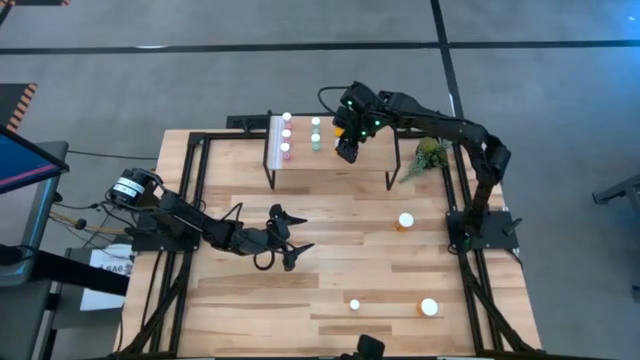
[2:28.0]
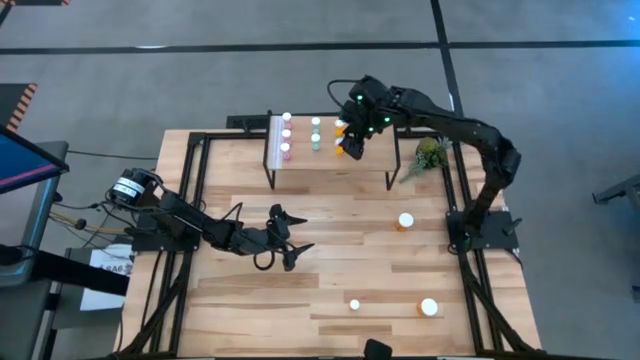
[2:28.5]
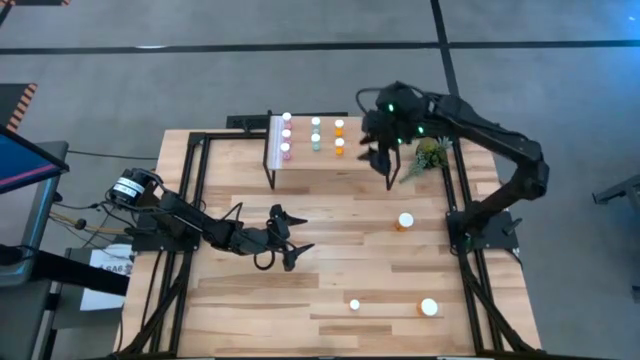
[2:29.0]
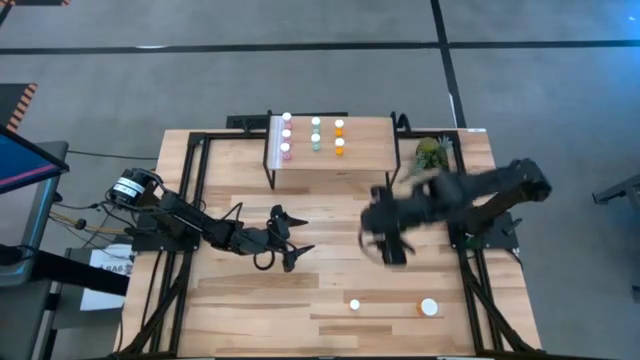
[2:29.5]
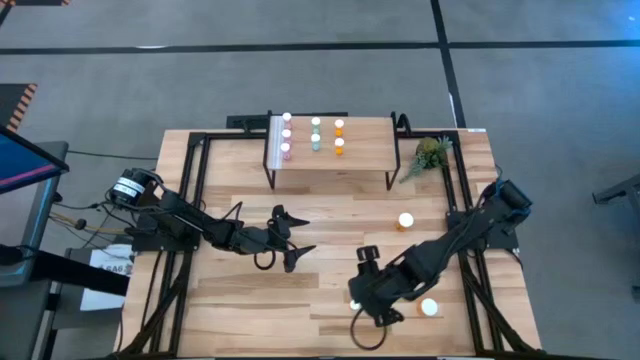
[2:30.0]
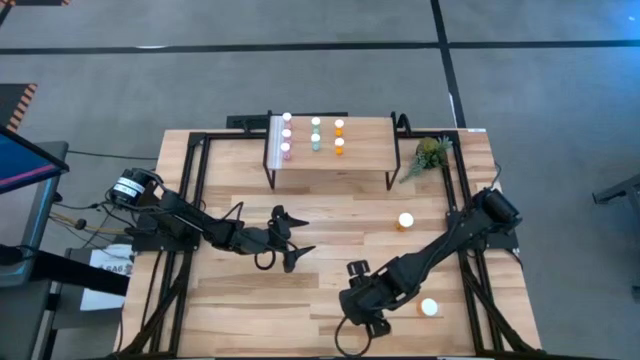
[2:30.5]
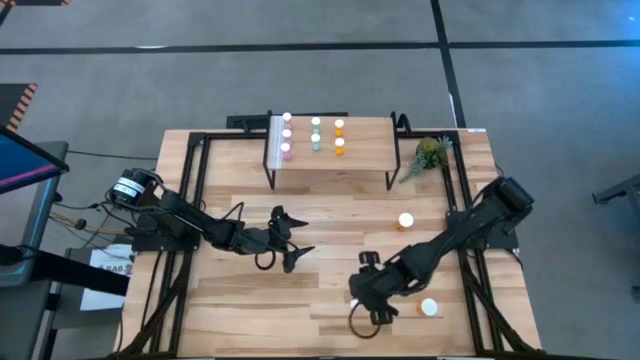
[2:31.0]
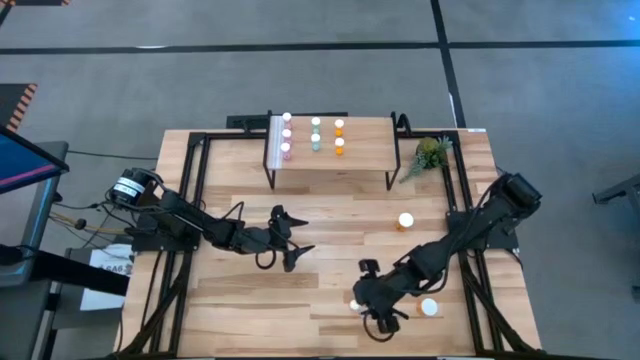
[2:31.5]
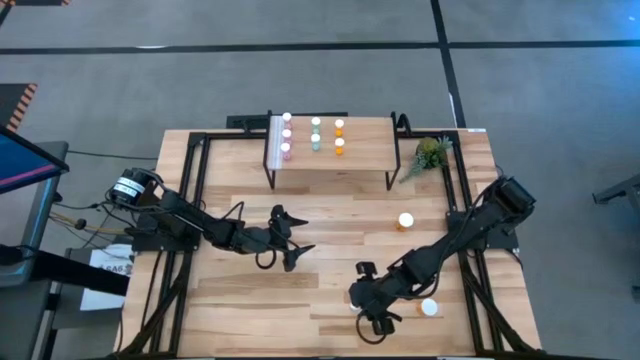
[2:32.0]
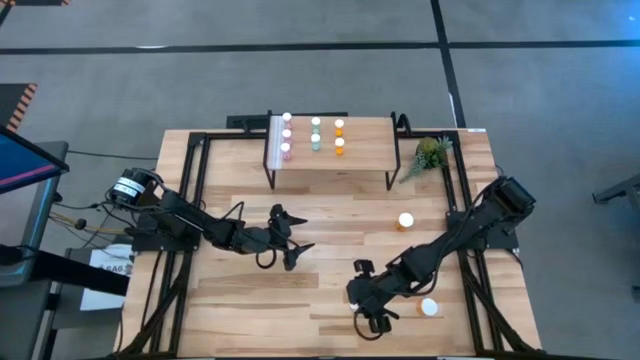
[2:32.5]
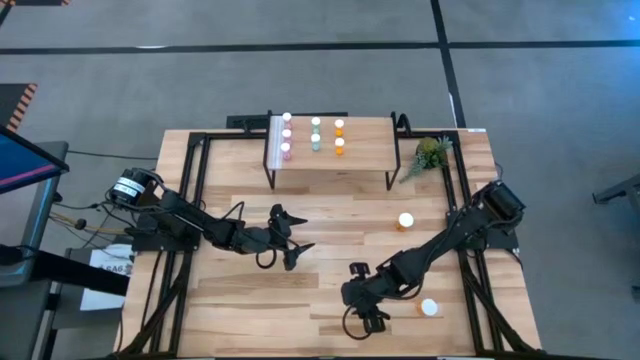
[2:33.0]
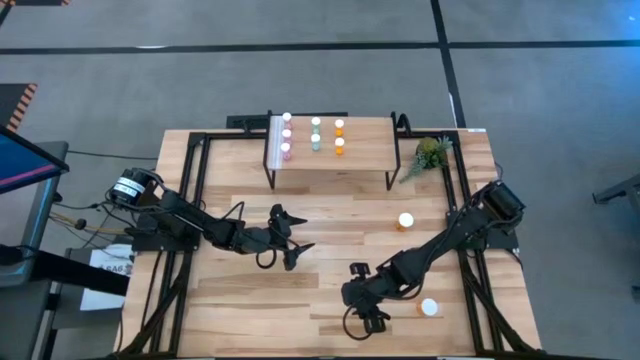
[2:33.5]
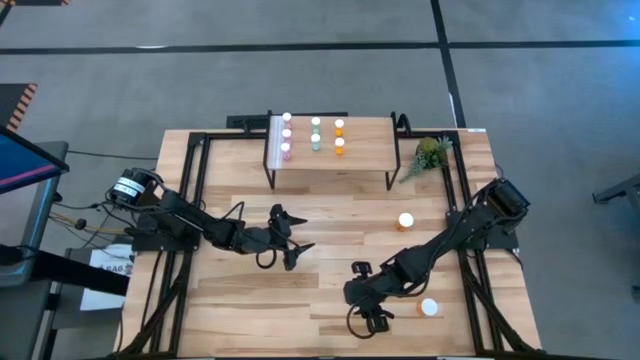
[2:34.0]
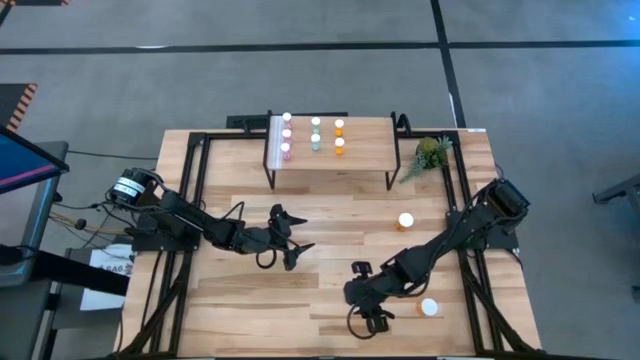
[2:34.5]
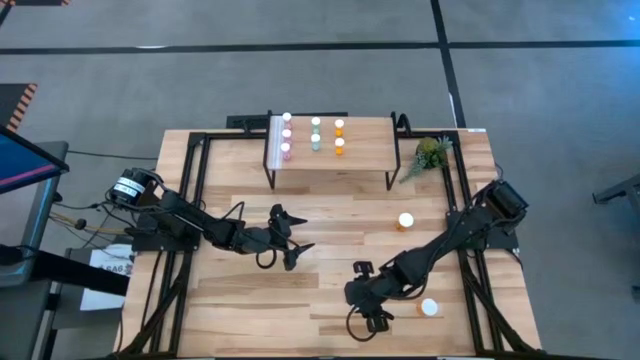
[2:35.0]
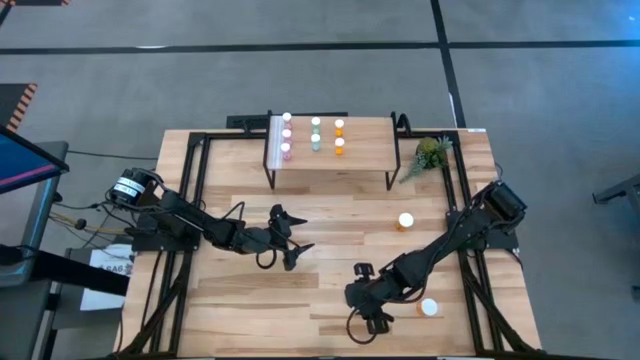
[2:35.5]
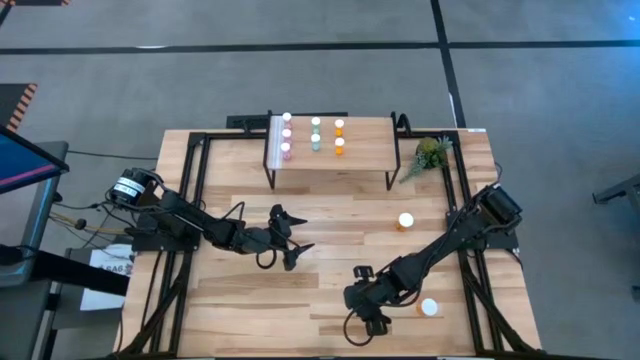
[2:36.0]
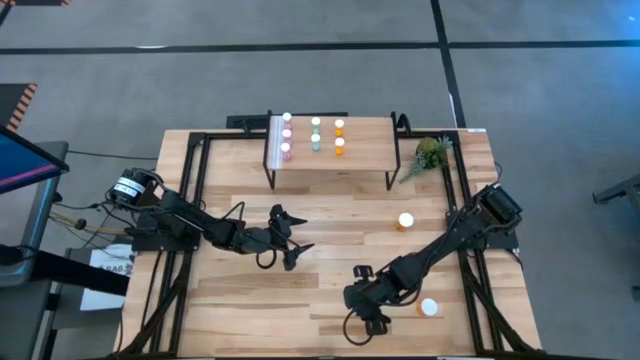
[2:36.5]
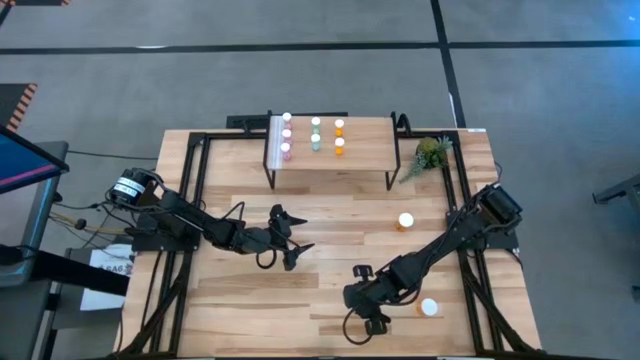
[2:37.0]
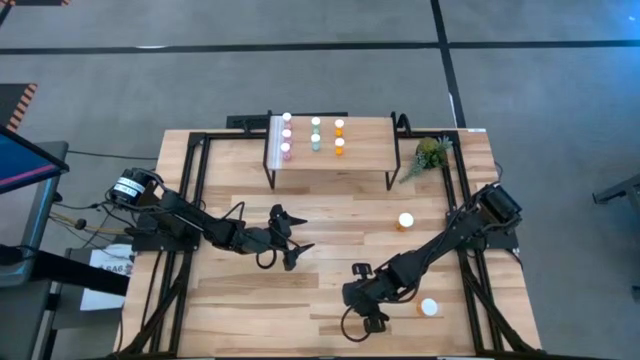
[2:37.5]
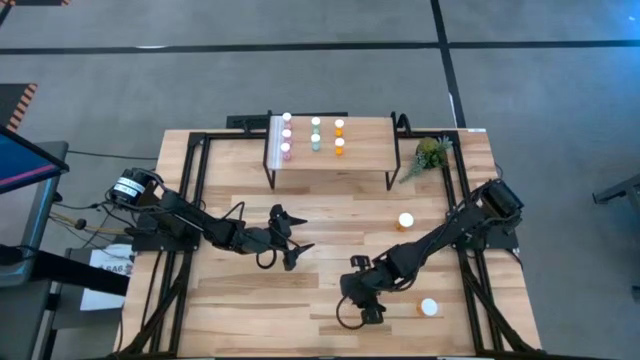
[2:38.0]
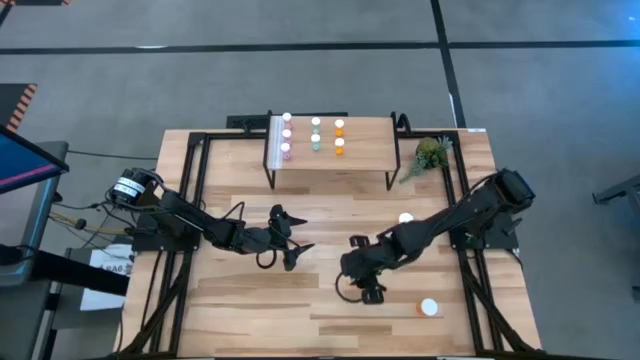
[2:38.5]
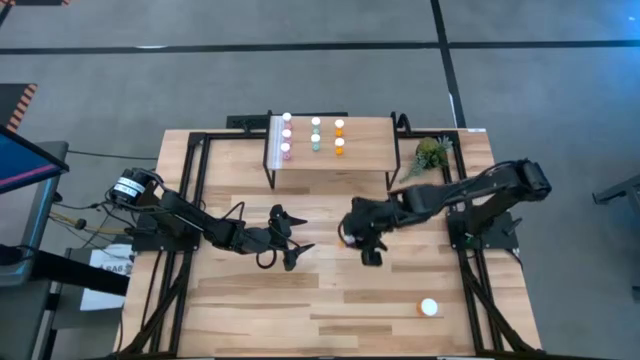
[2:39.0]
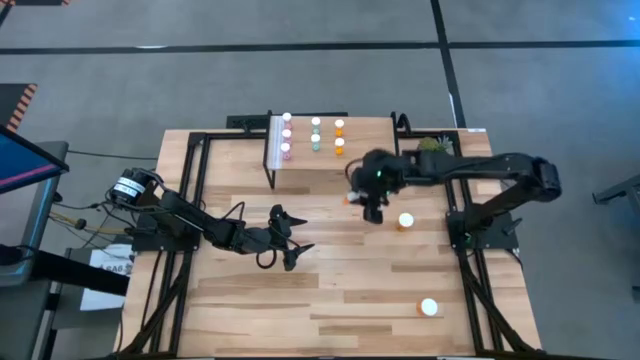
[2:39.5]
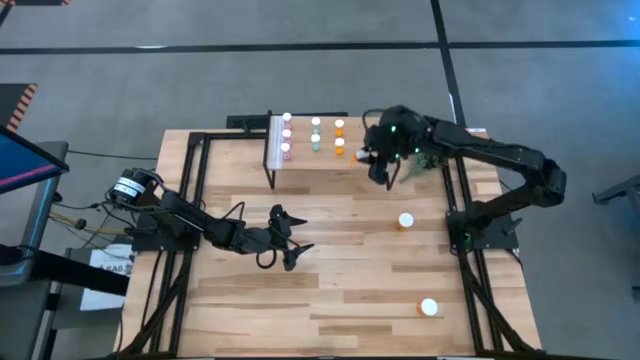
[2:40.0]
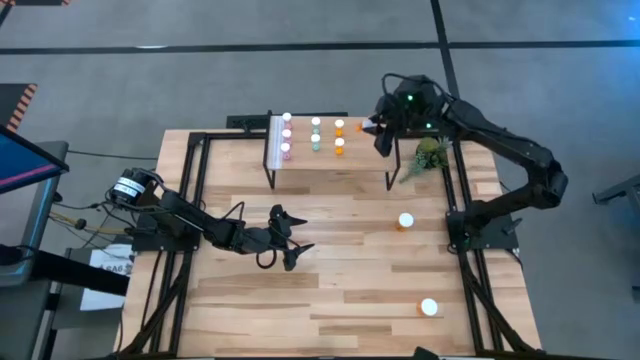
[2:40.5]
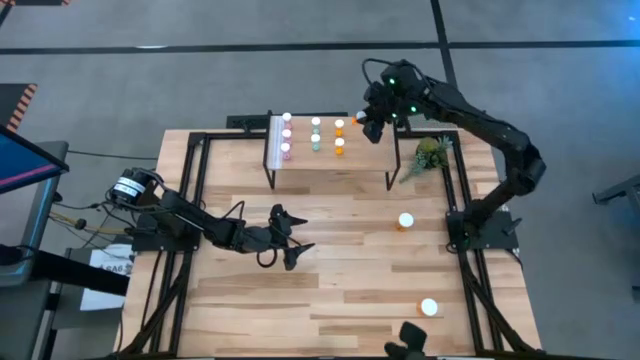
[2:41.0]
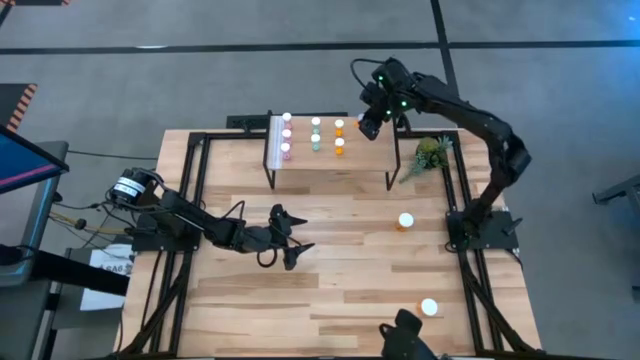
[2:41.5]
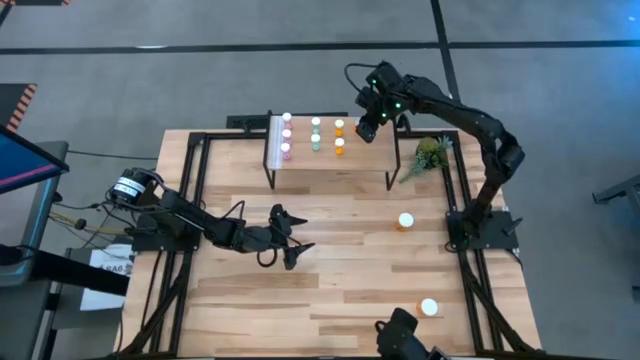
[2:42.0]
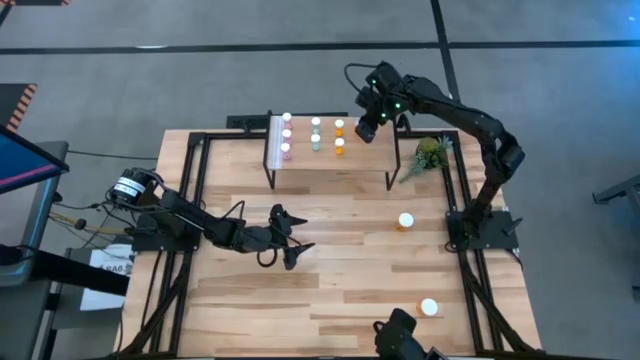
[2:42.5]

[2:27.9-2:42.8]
Task: Pick and place medicine bottles onto shelf by color
Put the small orange pill bottle on the shelf

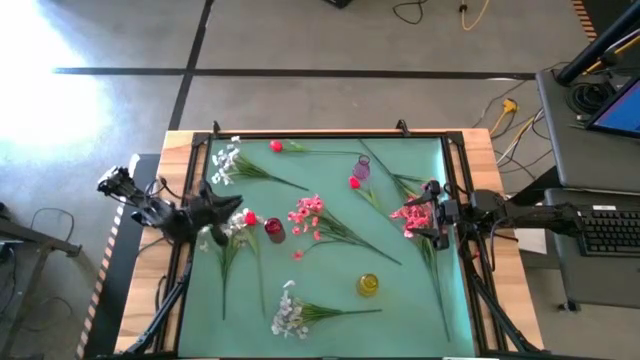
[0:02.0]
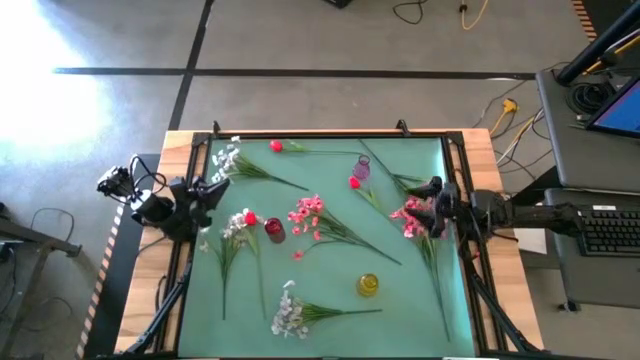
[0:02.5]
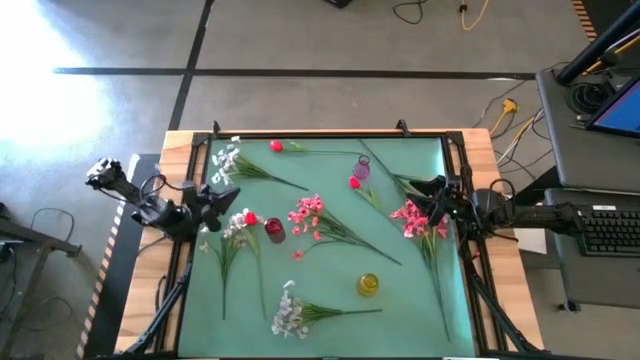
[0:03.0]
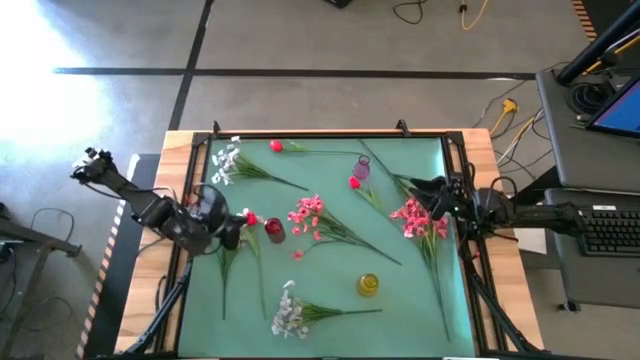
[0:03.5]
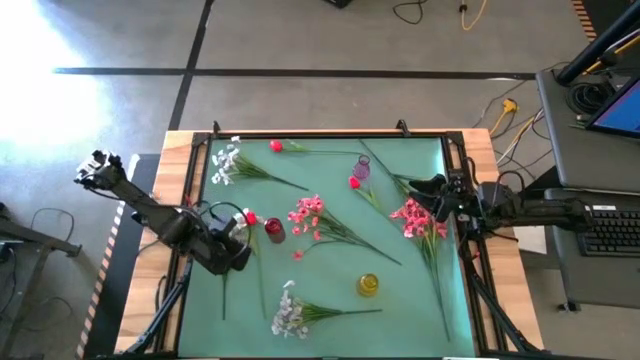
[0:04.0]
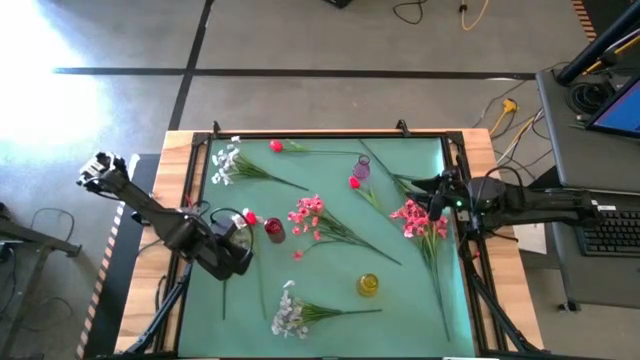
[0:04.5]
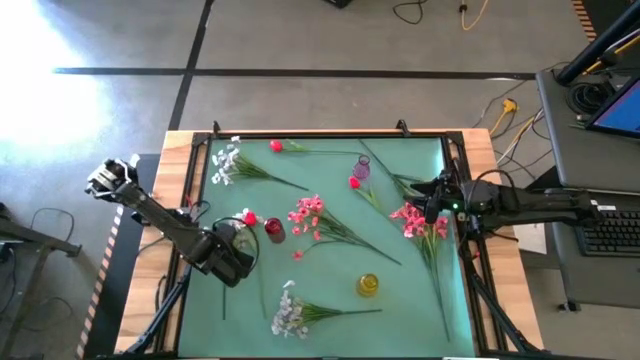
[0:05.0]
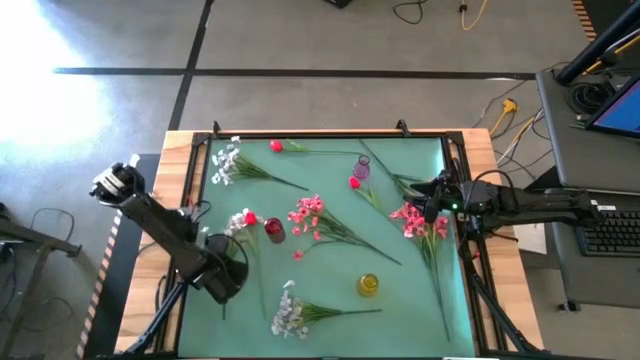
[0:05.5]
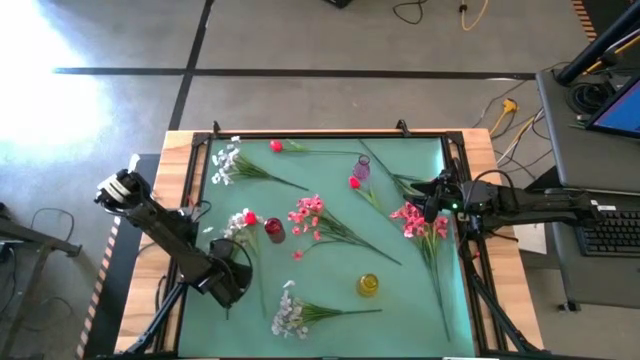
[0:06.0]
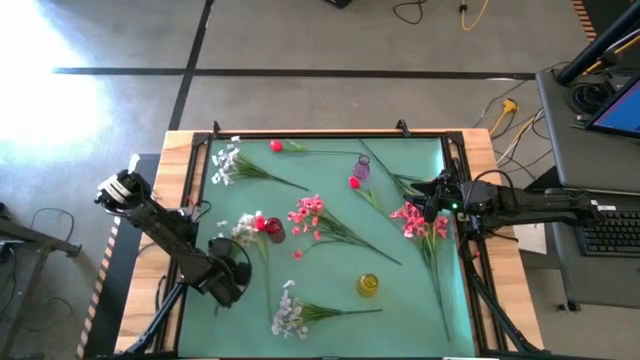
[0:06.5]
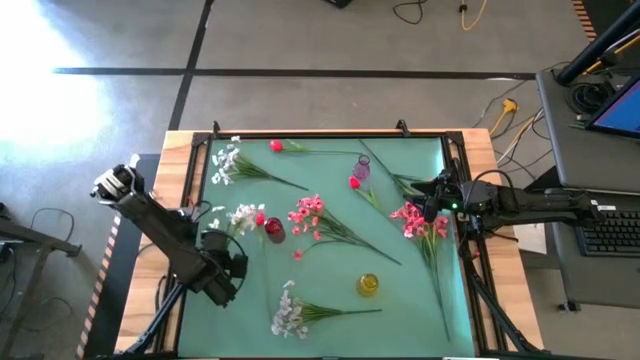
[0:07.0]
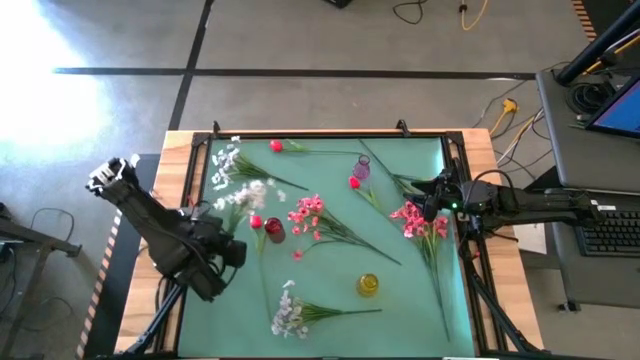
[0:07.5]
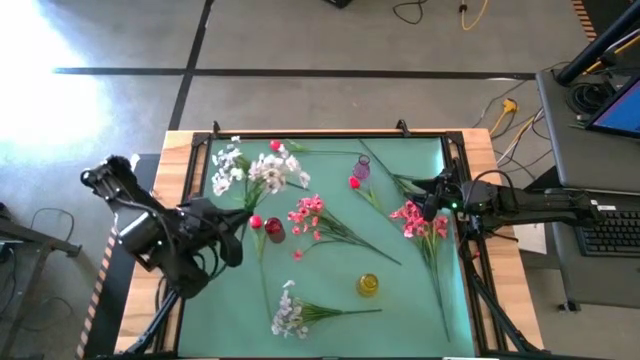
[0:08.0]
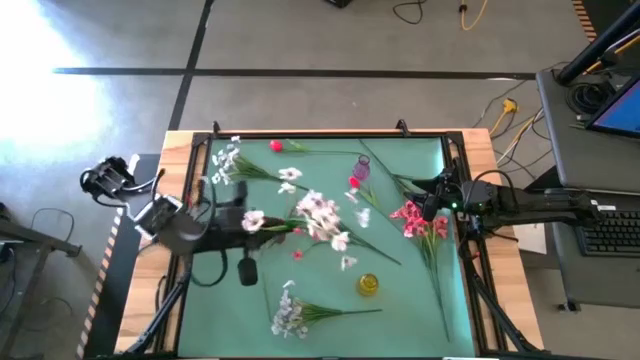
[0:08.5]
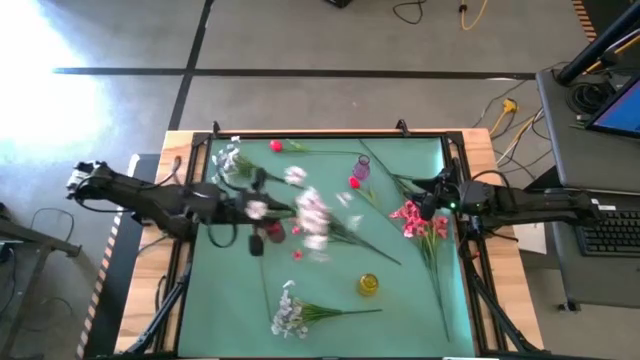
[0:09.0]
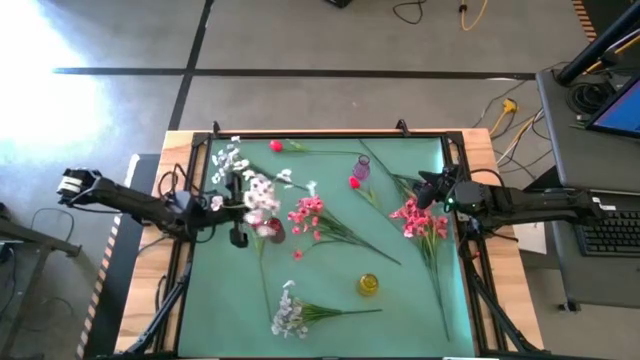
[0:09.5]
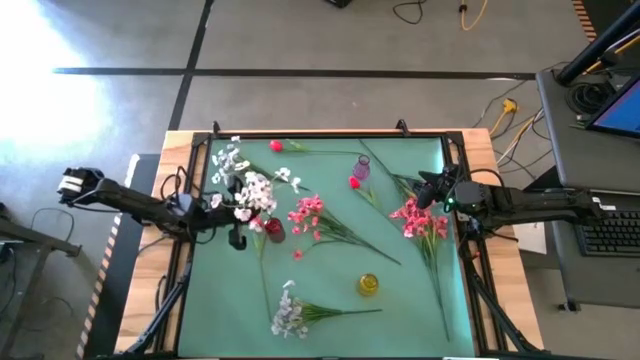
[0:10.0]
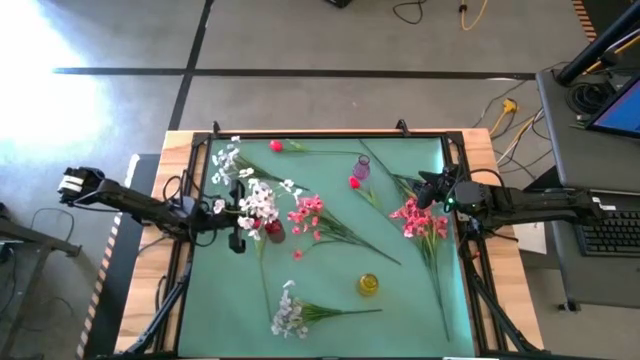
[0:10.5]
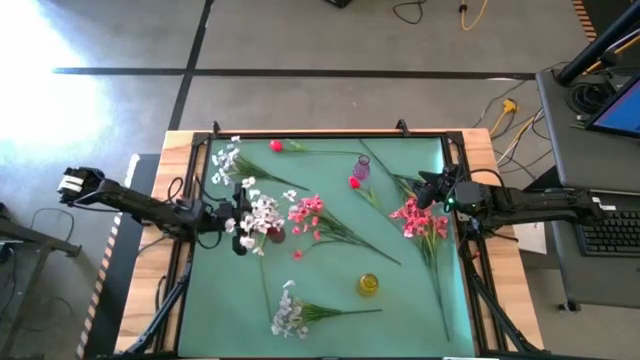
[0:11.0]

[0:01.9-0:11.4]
Task: Sort flowers into vase by color
Put the middle white flower into the red flower vase
